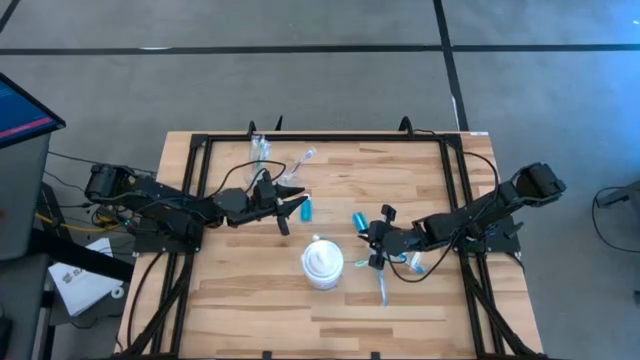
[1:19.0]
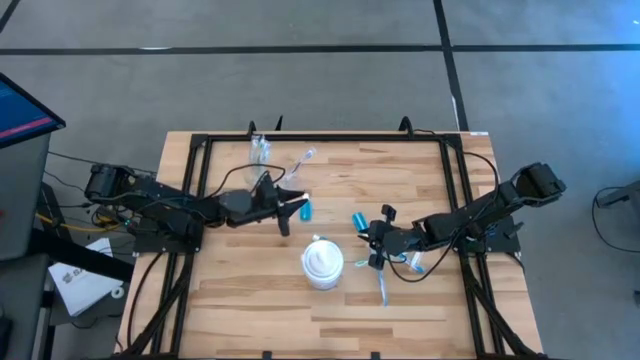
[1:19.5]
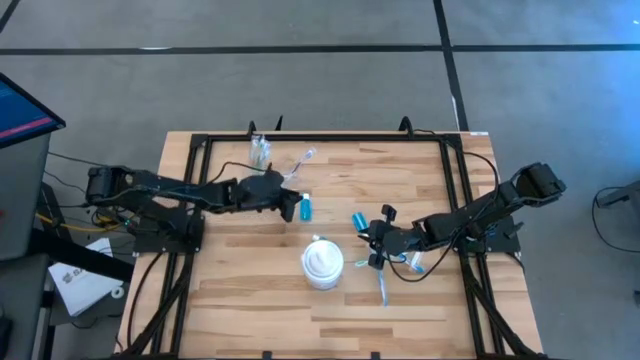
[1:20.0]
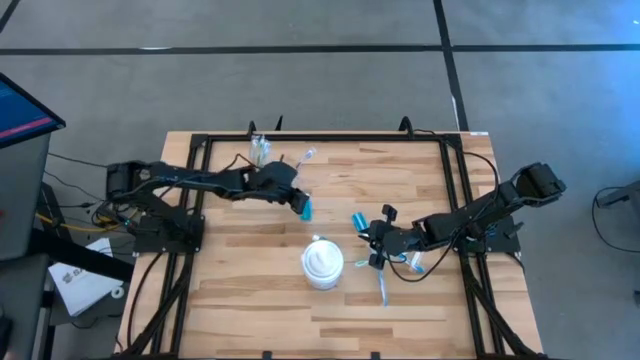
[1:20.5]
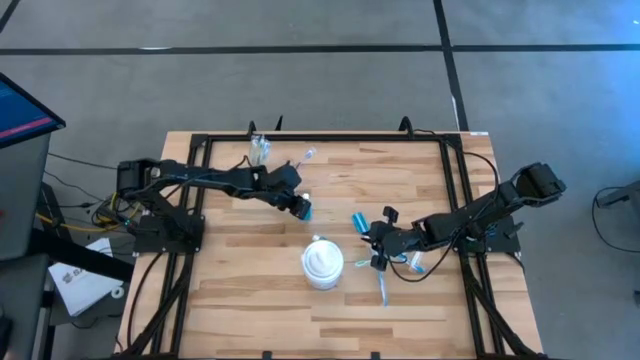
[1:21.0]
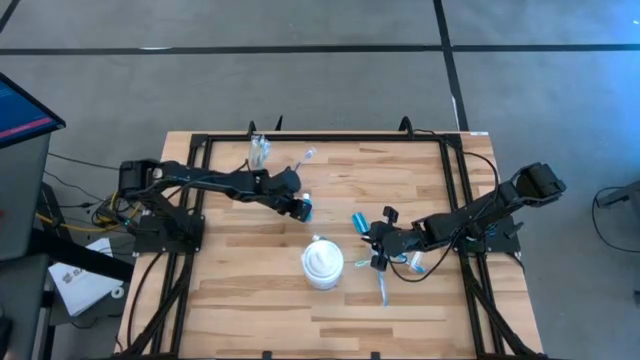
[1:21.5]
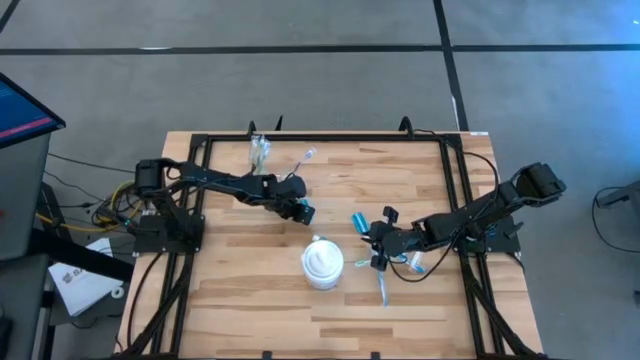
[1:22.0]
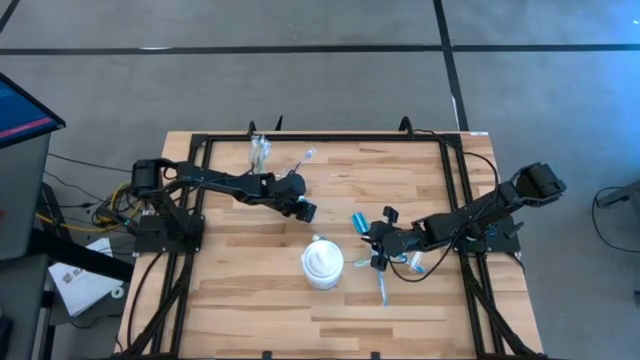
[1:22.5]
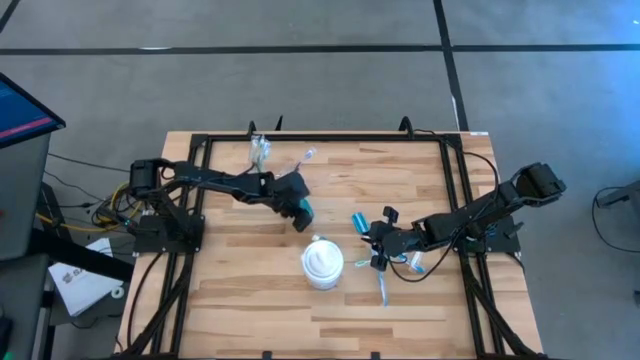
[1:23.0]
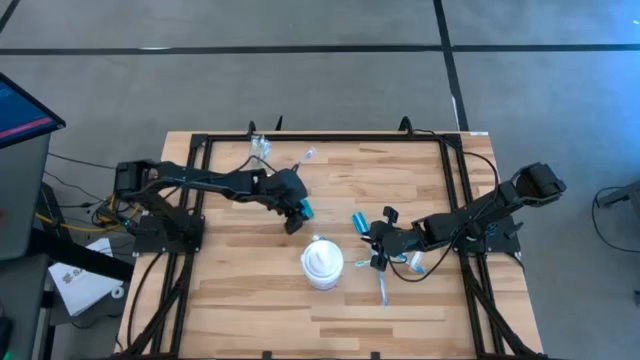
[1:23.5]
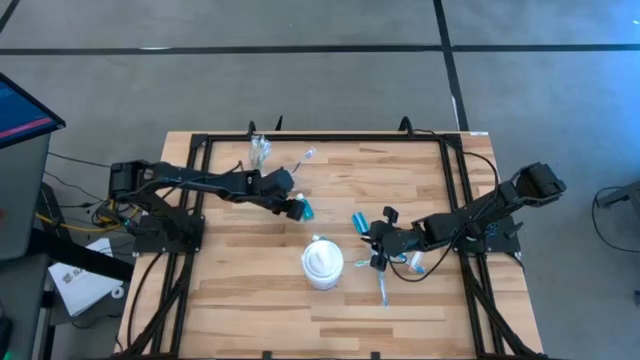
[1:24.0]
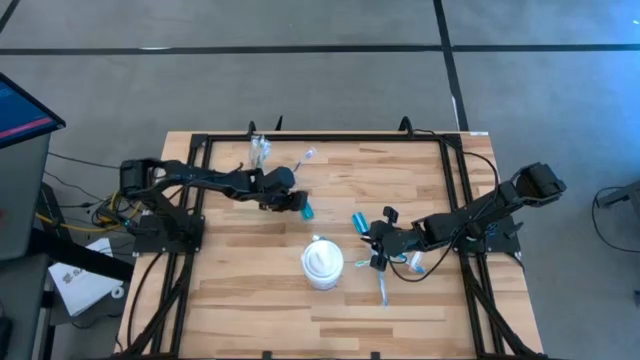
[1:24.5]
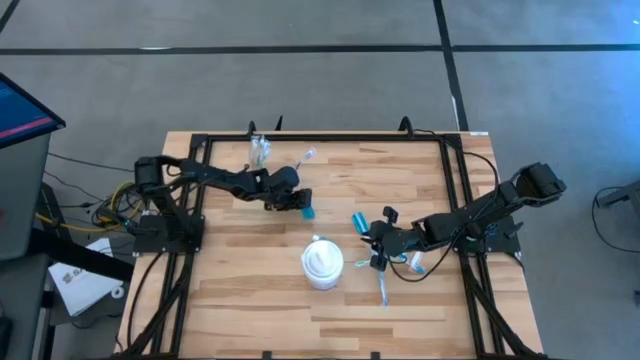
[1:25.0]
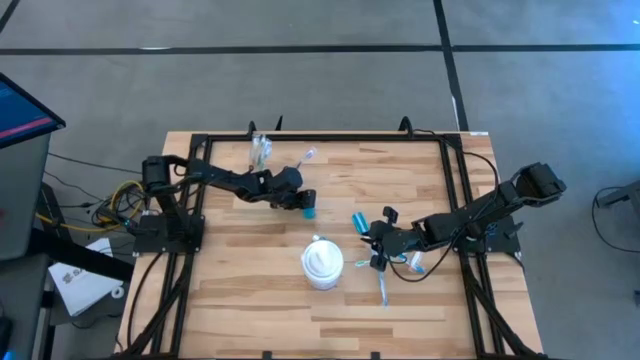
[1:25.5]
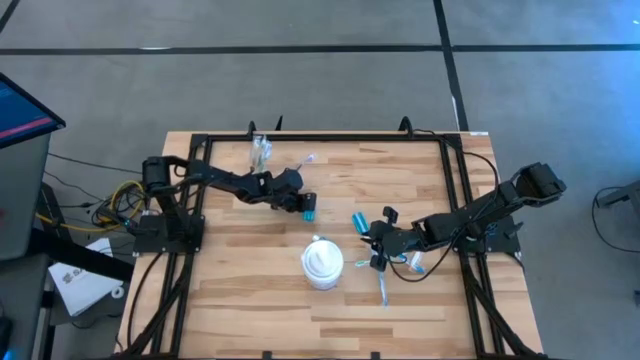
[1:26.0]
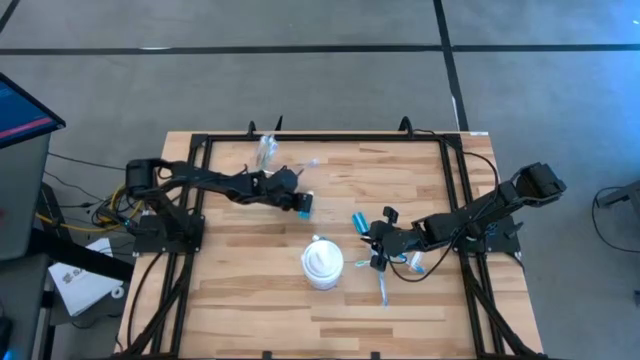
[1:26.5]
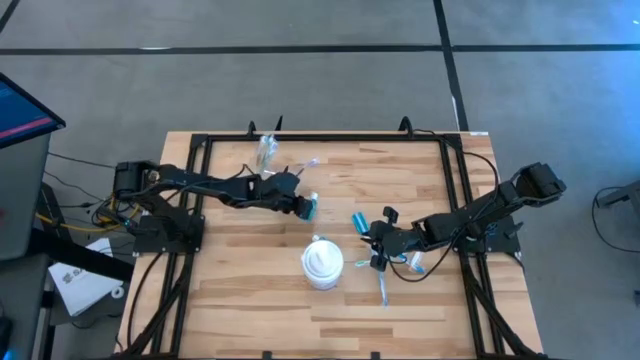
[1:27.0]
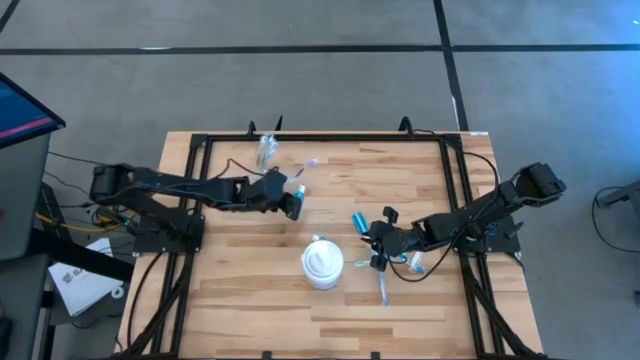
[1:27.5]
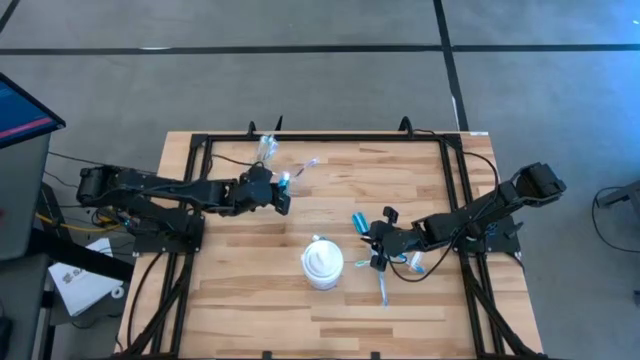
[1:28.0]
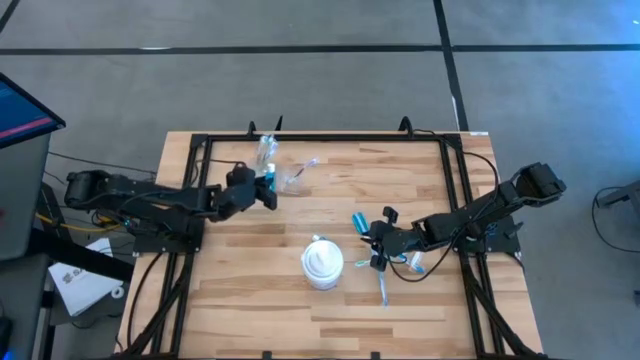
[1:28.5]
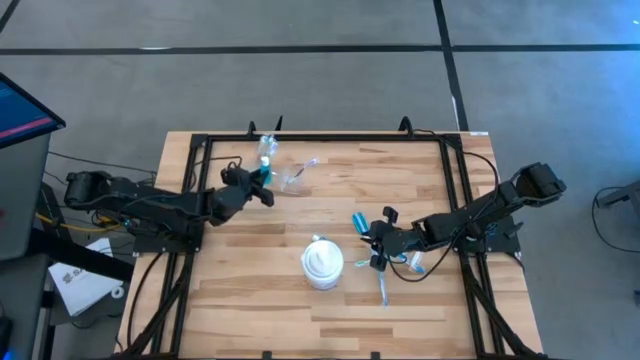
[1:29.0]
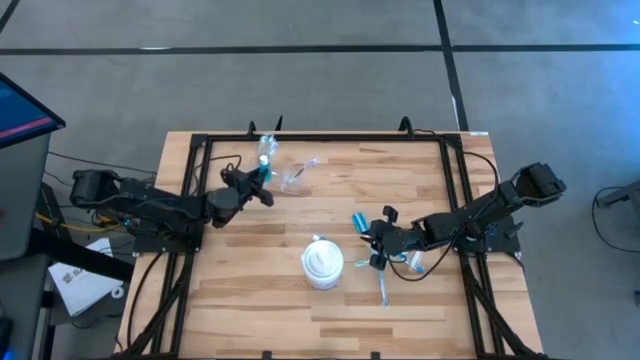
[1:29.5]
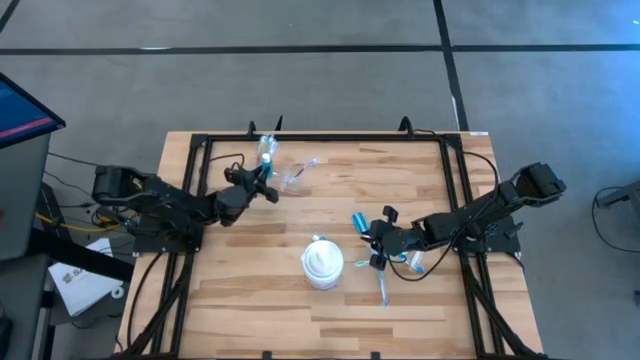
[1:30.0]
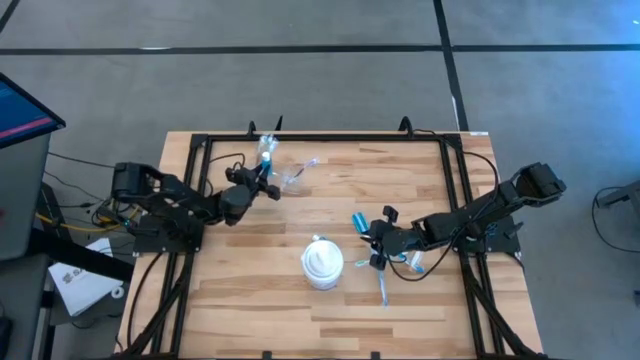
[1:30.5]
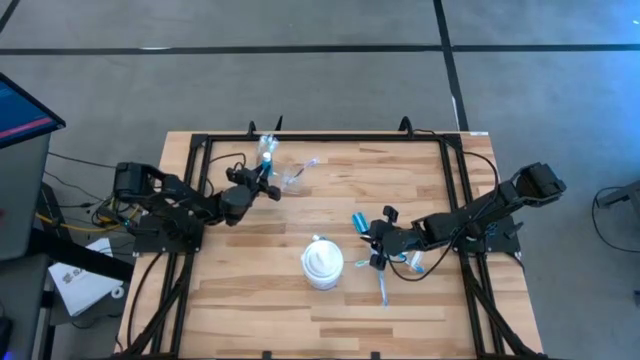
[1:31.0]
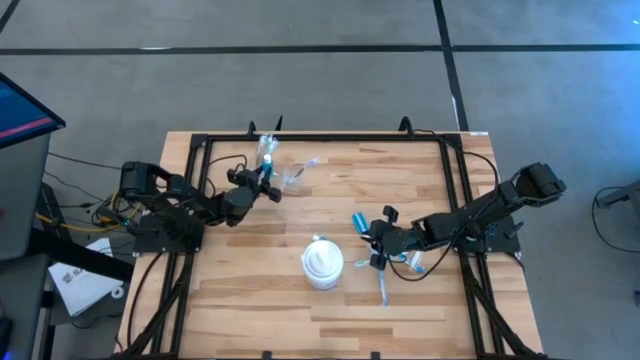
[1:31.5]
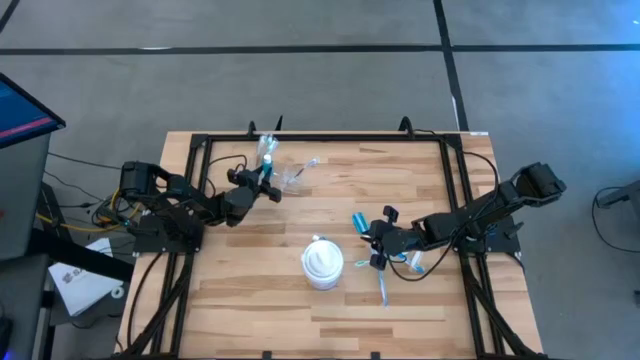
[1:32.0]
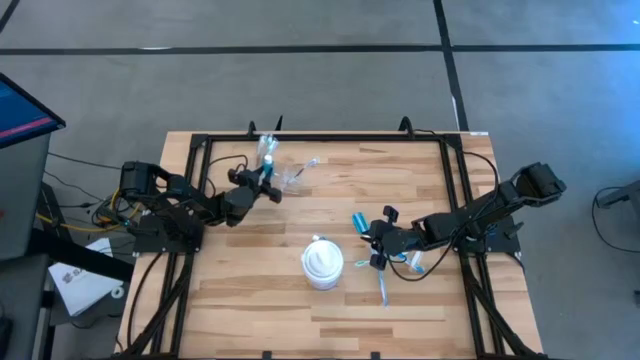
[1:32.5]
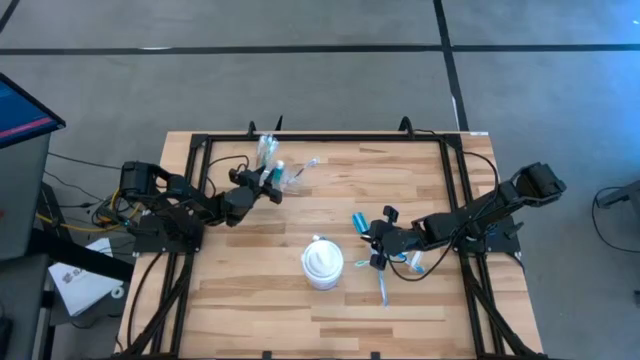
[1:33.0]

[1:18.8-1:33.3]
Task: Pick & Place toothbrushing station
Put the top left blue mouthwash into the transparent organizer

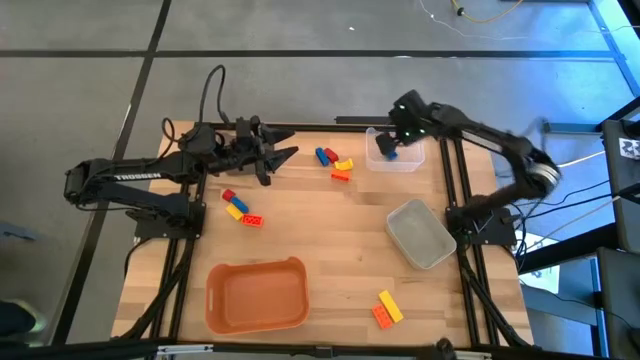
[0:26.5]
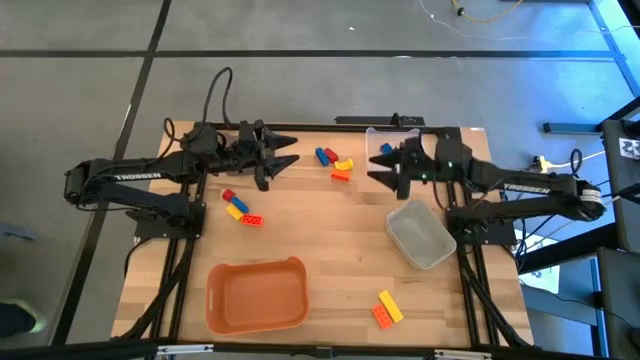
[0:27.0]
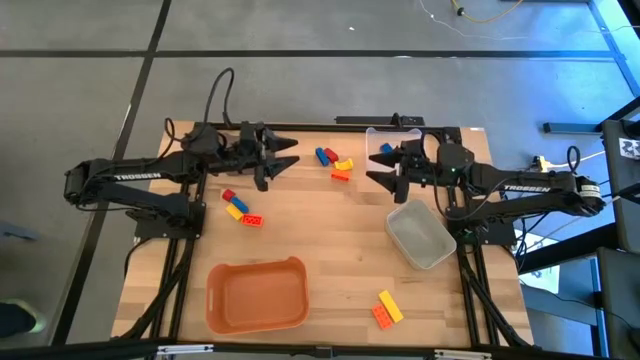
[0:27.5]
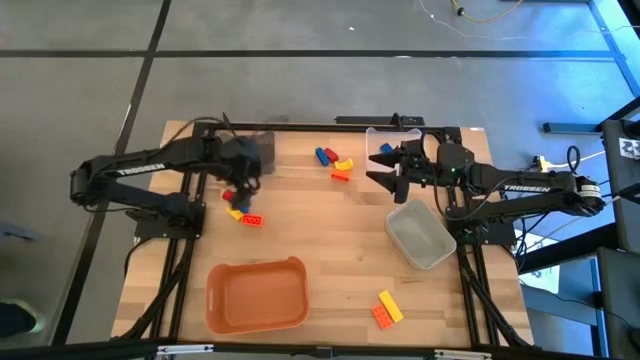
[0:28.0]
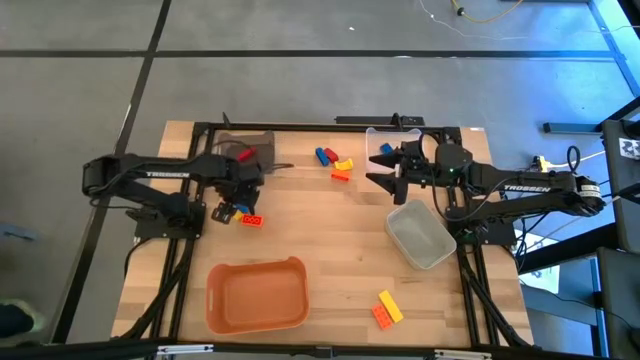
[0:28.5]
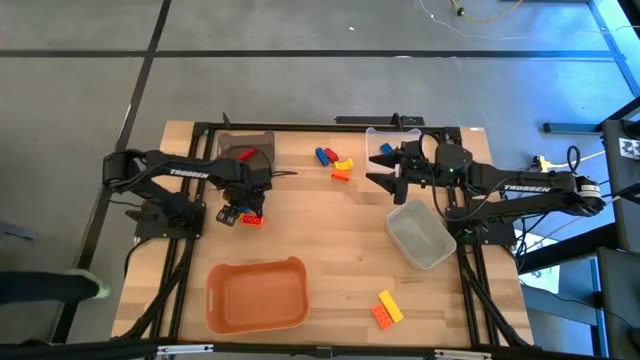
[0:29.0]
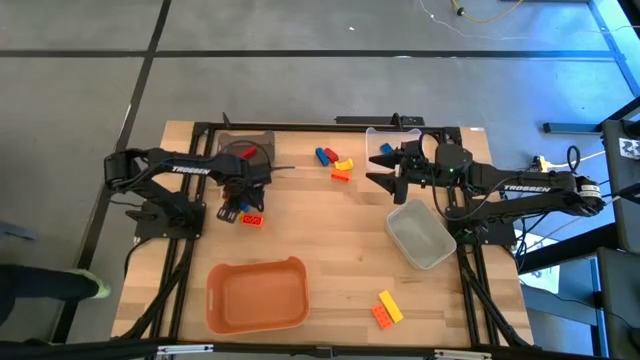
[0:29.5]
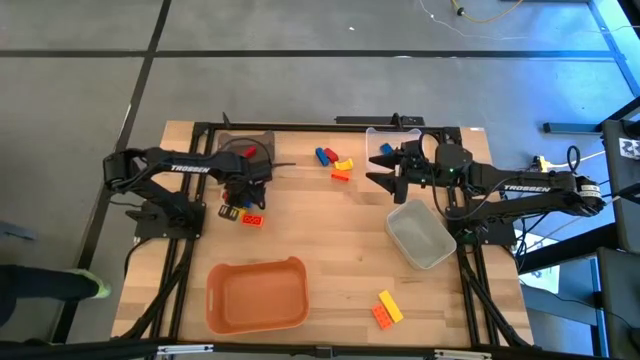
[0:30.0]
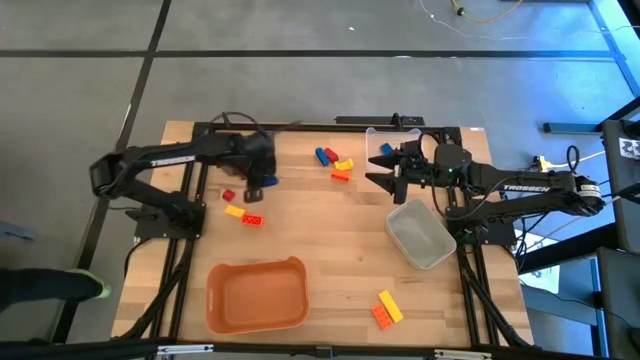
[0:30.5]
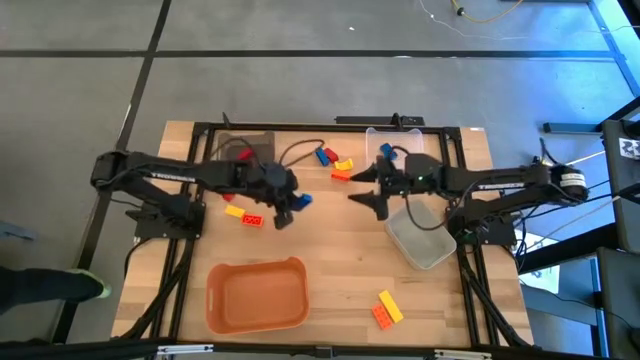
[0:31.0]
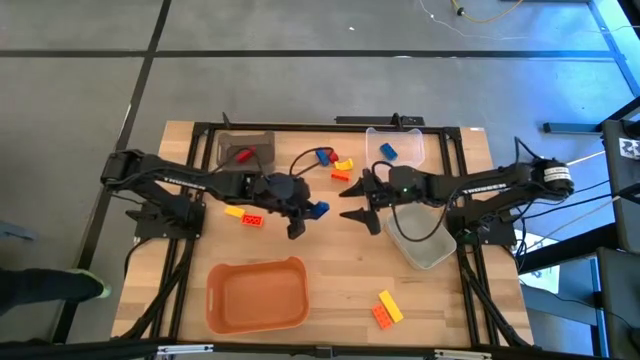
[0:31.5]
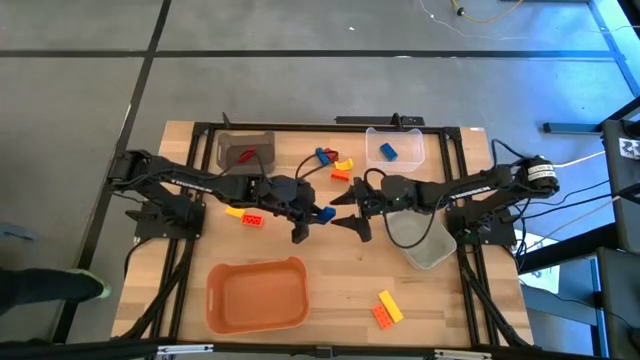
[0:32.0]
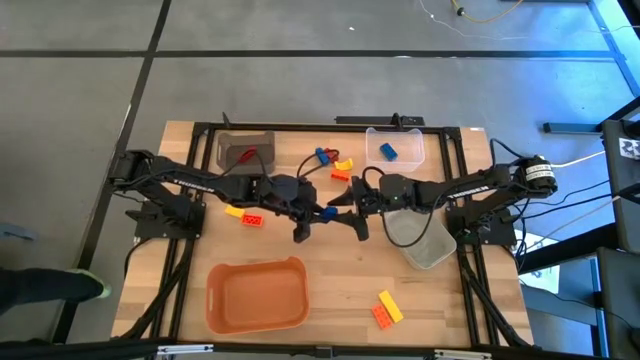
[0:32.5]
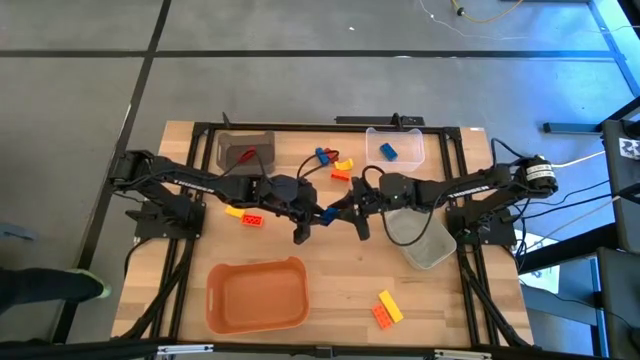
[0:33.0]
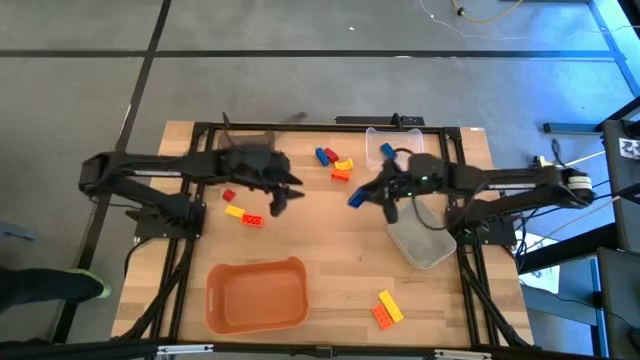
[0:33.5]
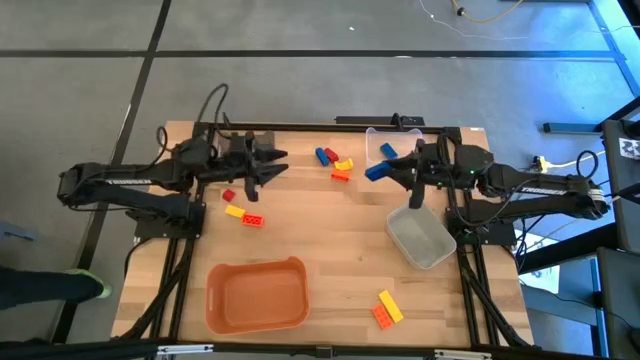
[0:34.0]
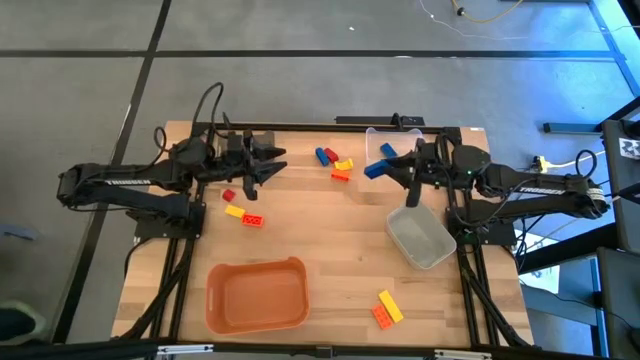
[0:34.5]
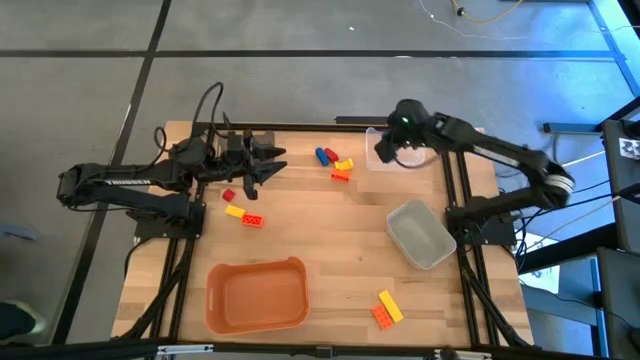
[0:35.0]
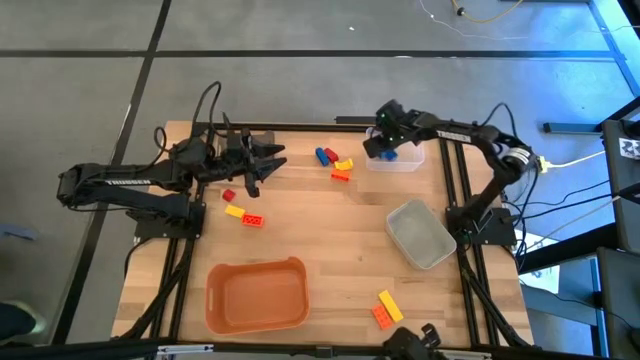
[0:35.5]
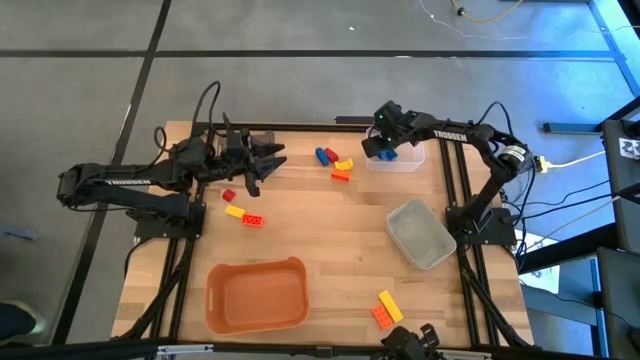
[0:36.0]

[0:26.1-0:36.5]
Task: Sort & place blocks by color
Put the bottom blue game piece into the transparent bin
